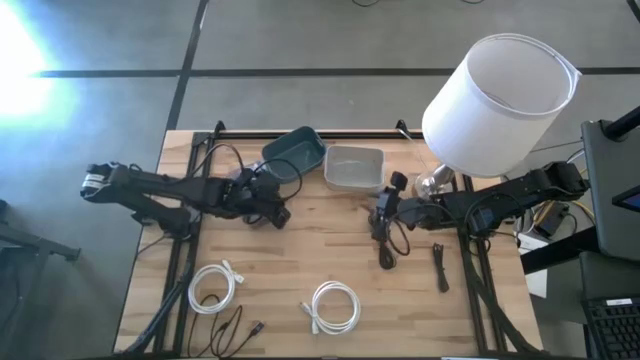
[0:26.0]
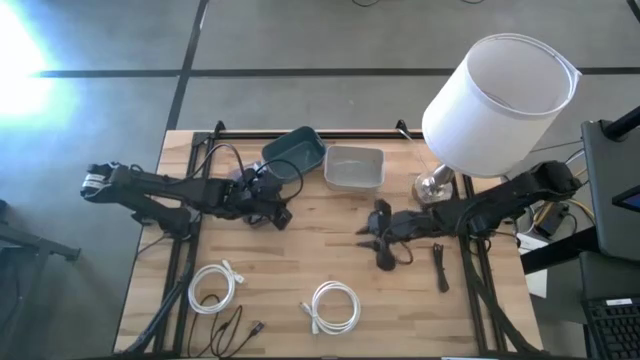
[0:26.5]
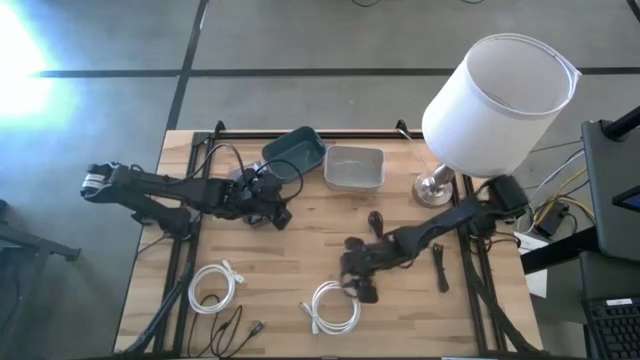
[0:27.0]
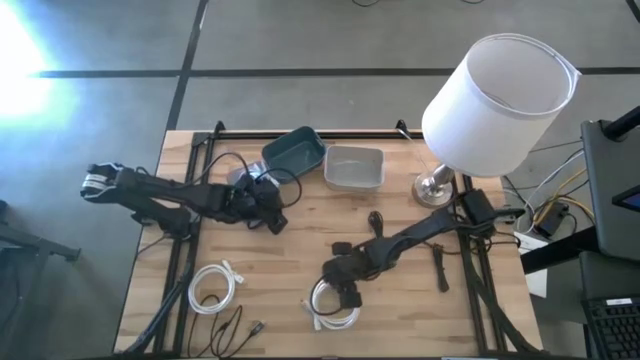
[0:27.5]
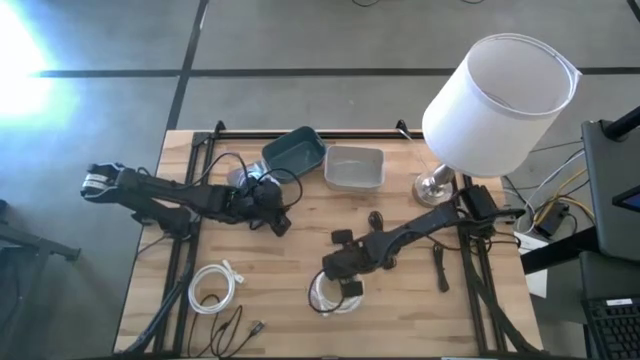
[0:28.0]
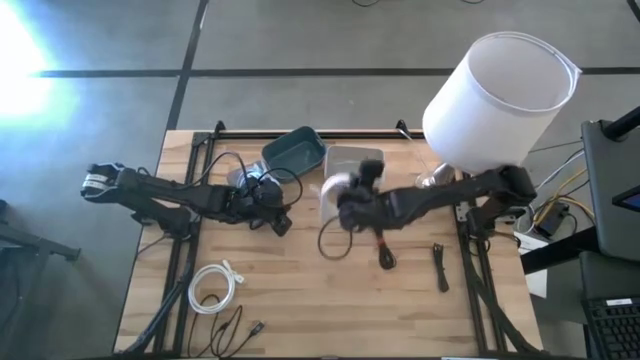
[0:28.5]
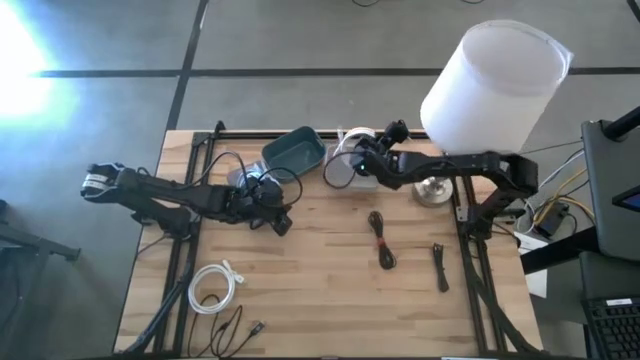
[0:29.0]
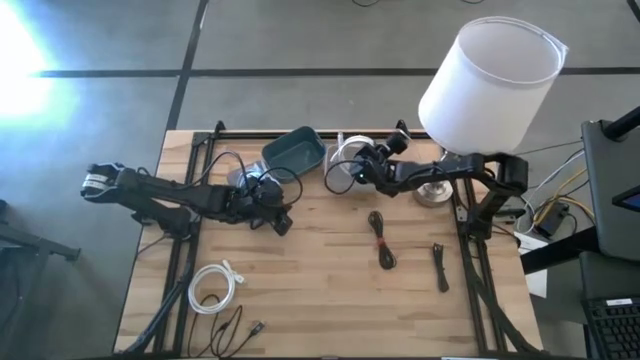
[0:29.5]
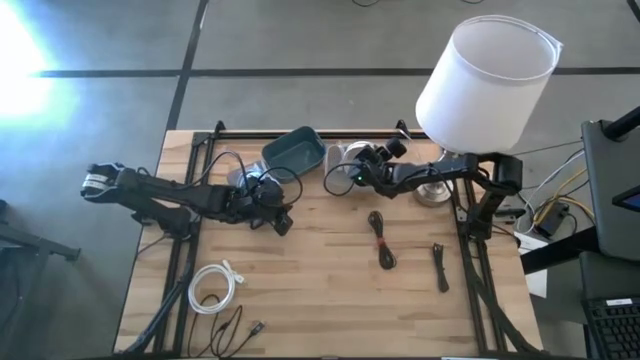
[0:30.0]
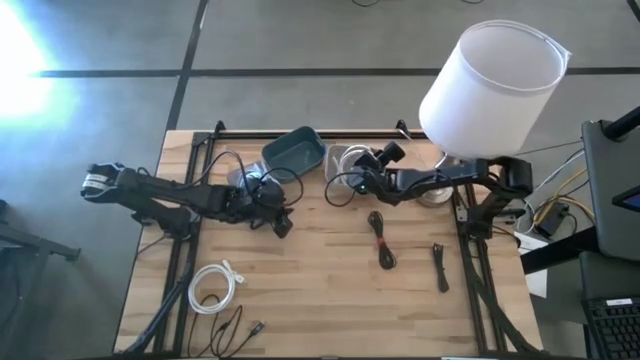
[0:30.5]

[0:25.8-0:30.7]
Task: Pick & Place USB Port
Put the right white HDMI cable into the white bin

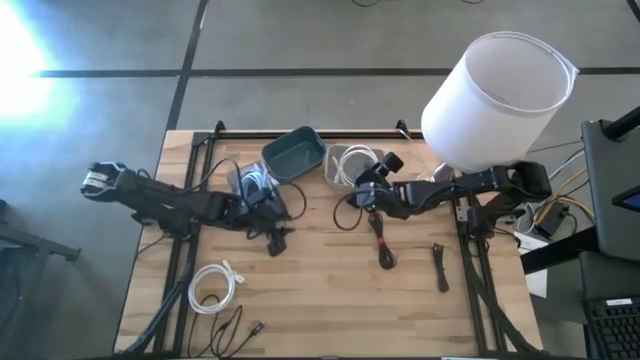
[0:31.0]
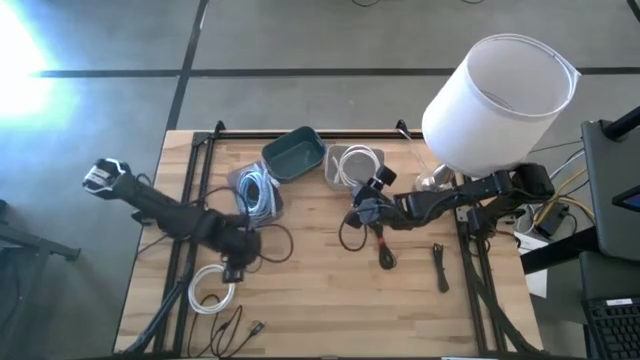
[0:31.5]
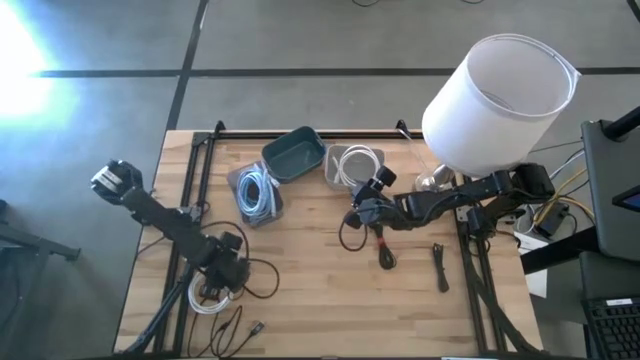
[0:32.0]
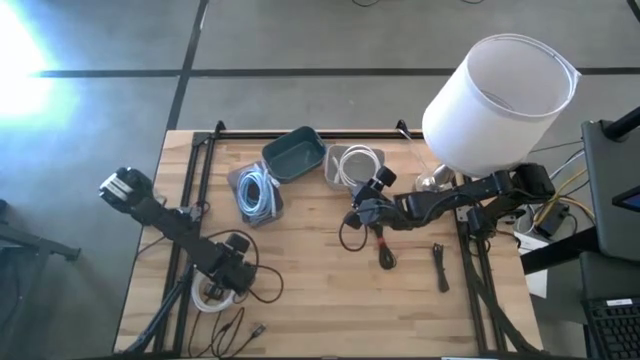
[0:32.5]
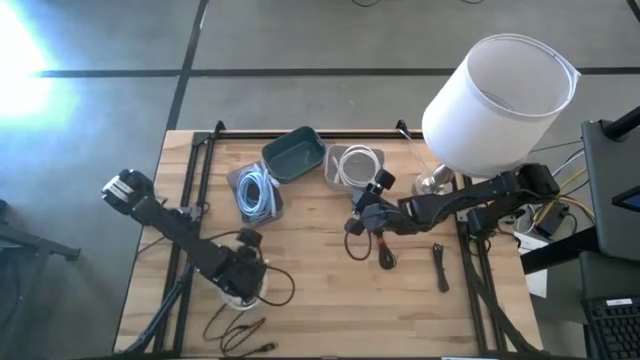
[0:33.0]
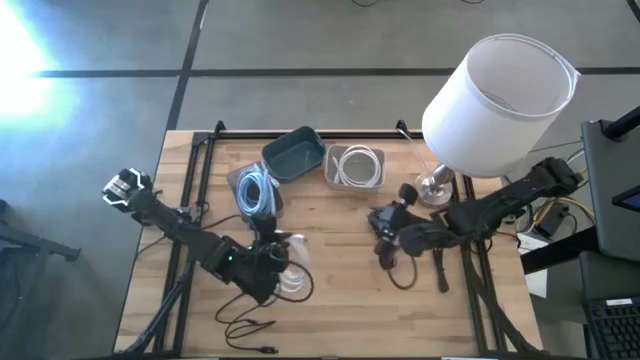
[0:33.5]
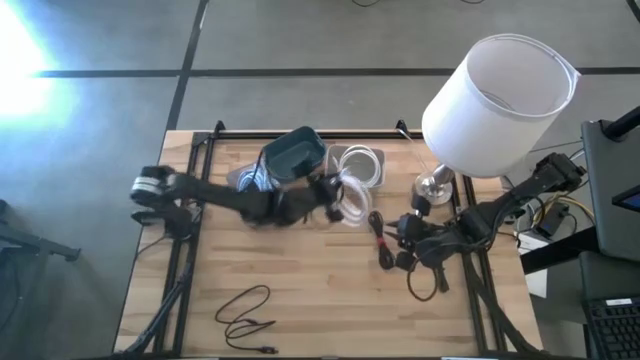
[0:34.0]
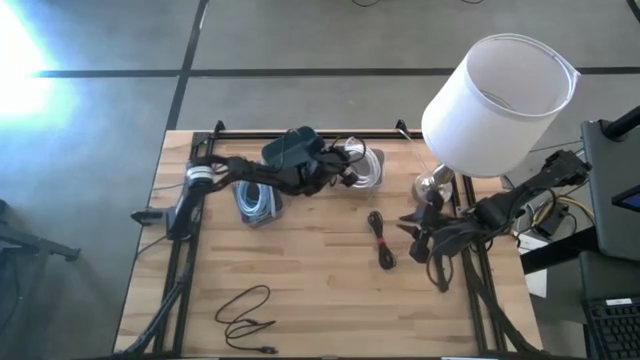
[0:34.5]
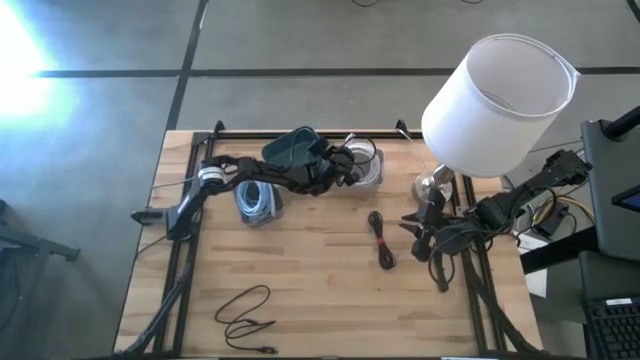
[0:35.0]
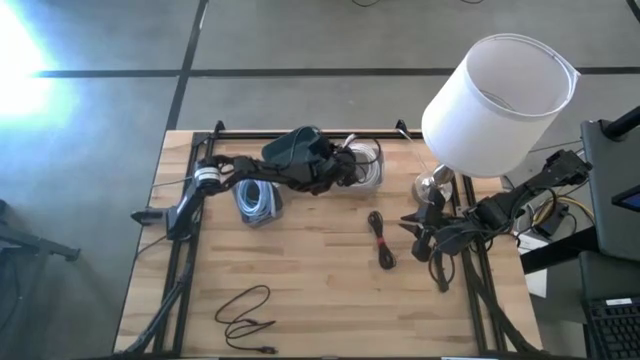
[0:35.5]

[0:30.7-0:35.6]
Put the white HDMI cable into the white bin

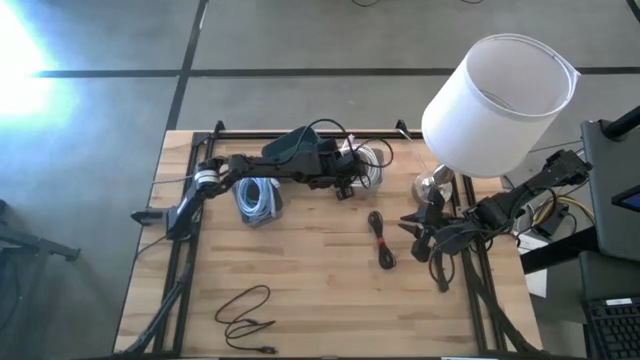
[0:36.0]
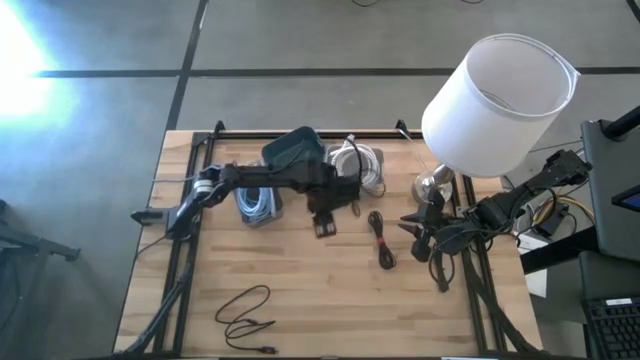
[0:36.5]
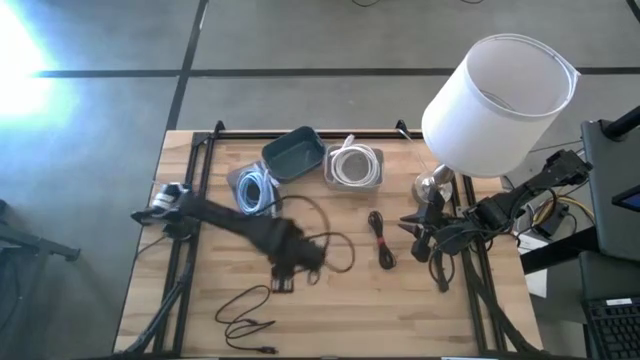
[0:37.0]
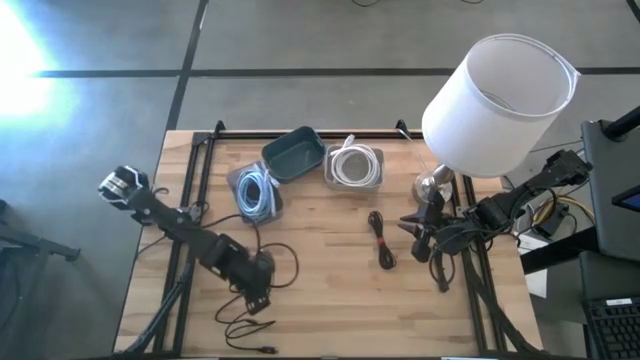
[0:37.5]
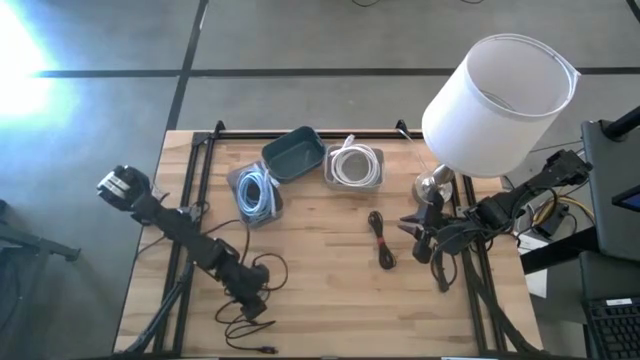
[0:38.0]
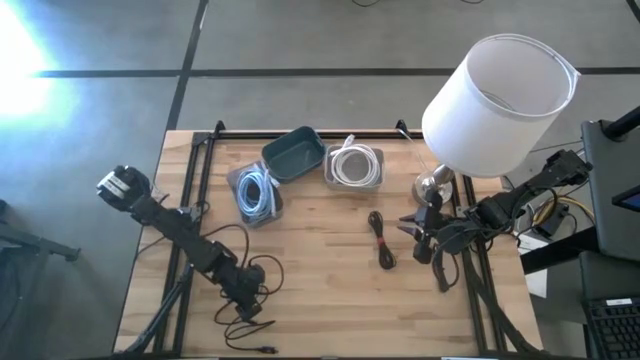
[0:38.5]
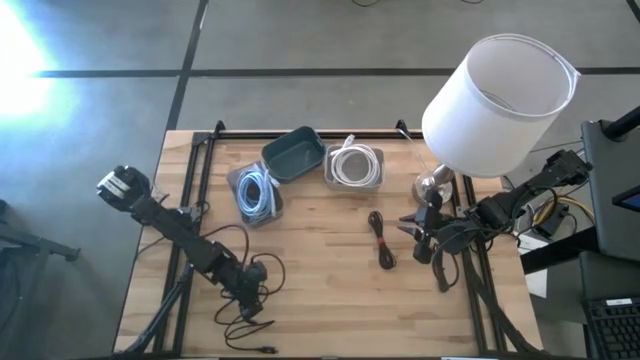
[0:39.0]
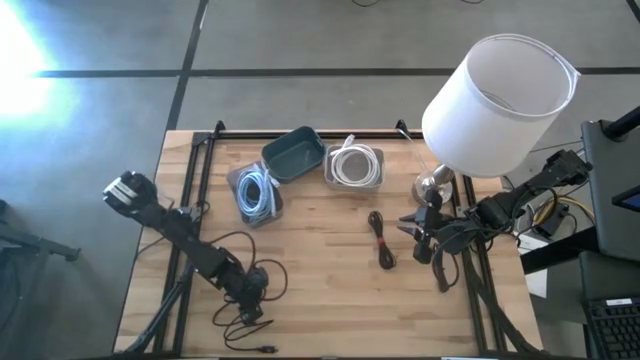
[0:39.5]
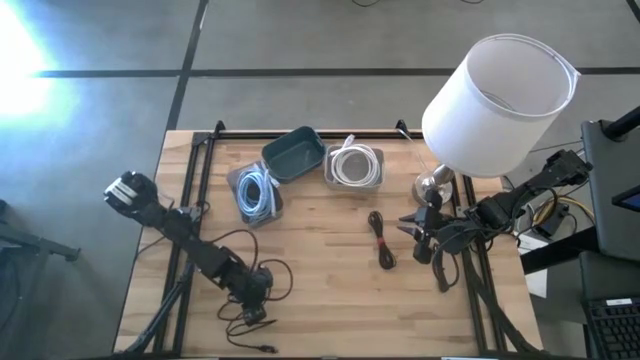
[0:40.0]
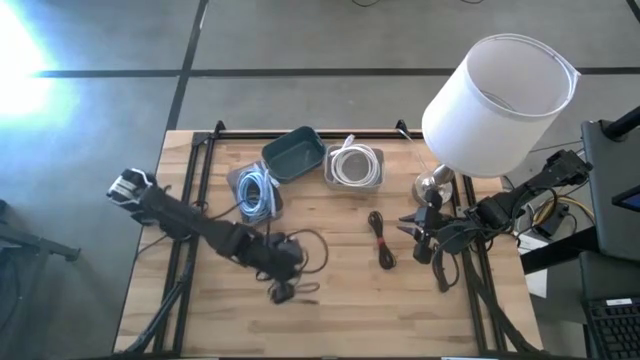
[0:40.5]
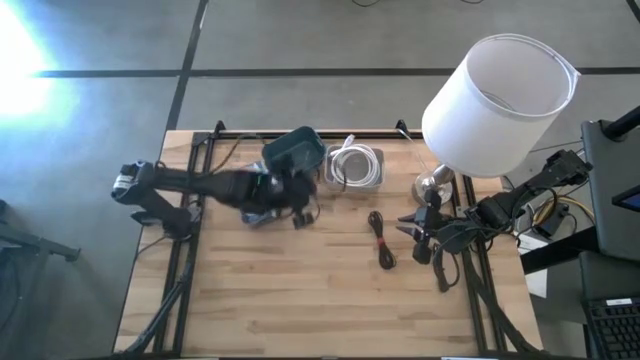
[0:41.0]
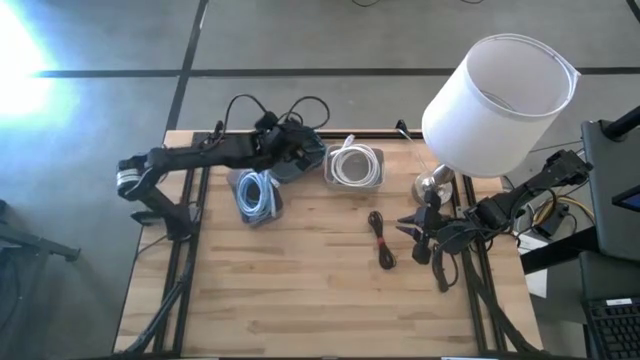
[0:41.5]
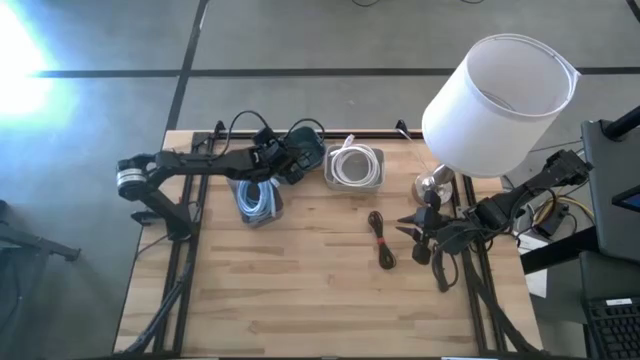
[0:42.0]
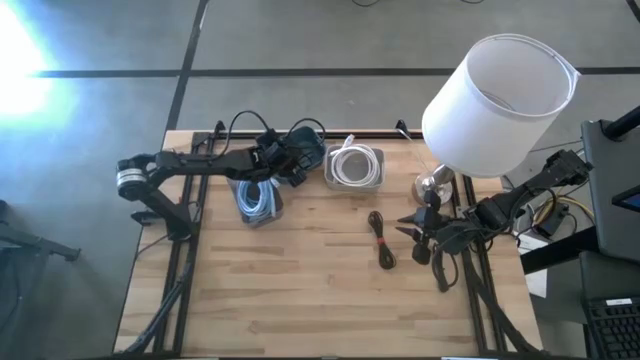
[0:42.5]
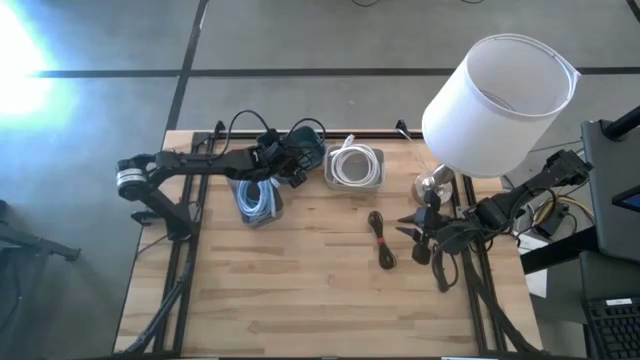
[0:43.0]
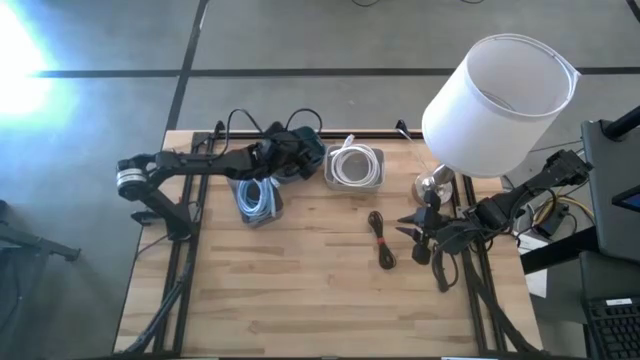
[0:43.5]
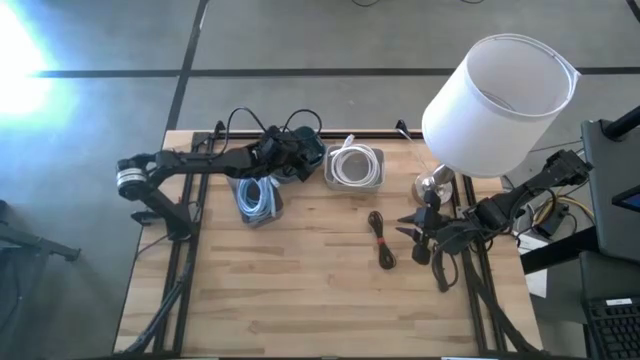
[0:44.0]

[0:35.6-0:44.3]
Put the bottom left black charger cable into the dark green bin

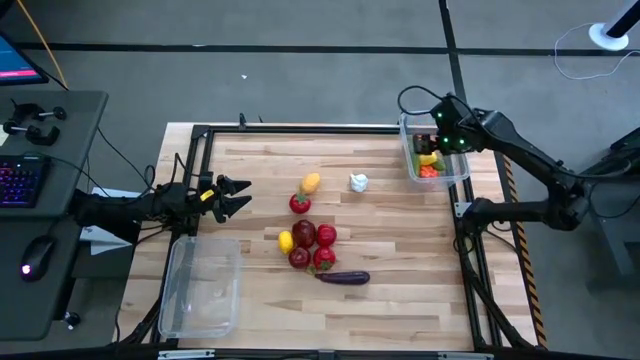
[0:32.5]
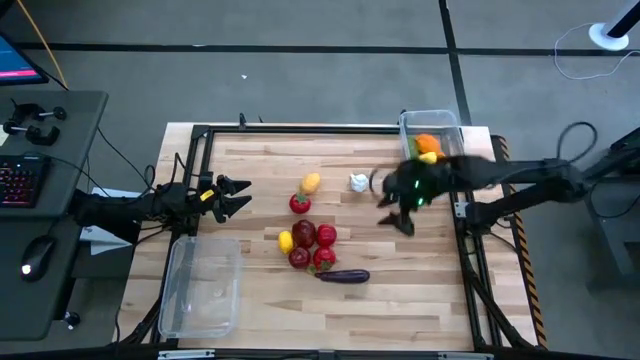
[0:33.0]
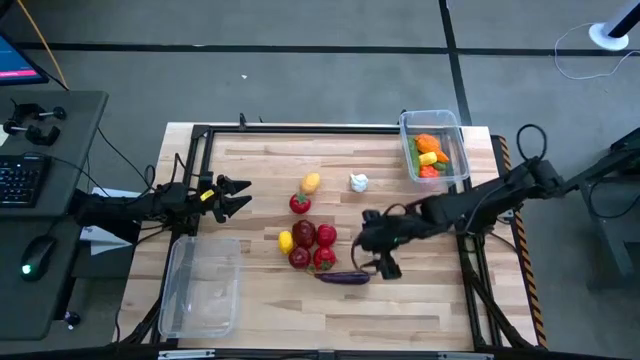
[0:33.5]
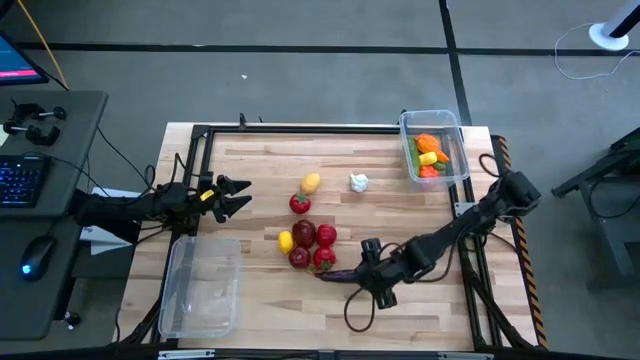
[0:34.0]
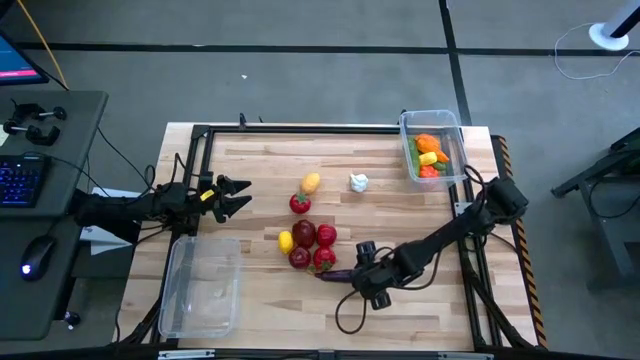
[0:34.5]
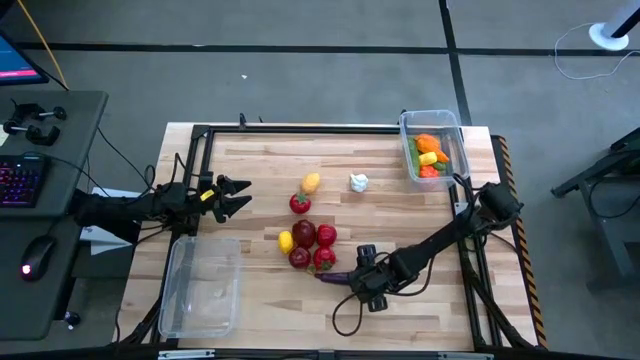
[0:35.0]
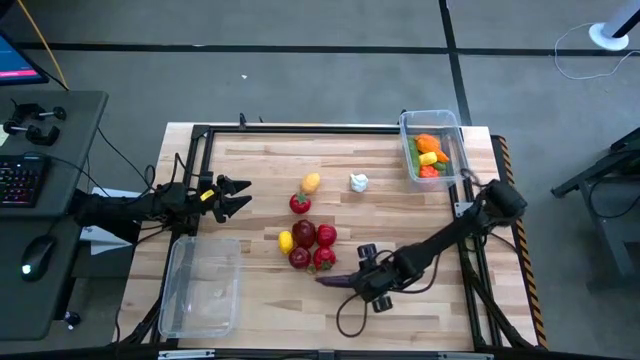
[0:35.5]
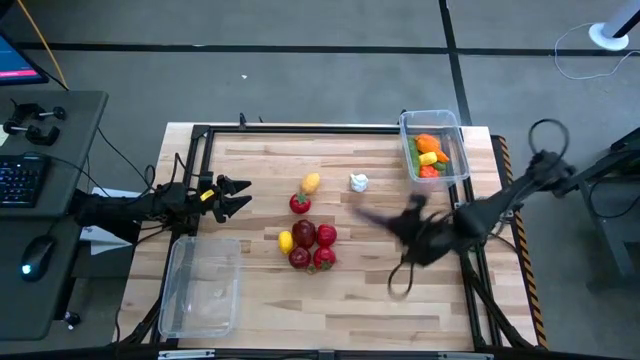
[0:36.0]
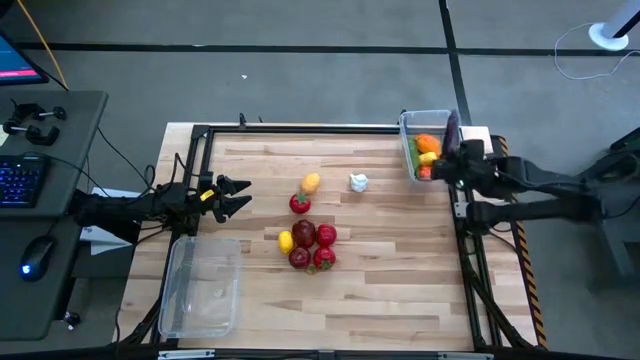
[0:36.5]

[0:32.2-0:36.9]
Task: Sort produce into baskets
Put the purple eggplant into the top transparent bin
